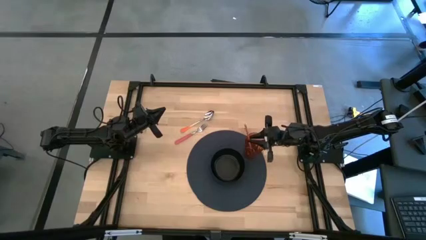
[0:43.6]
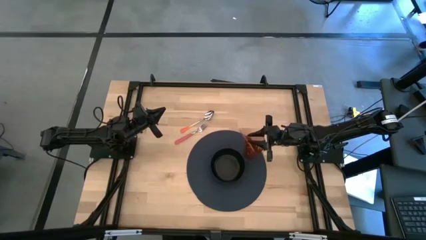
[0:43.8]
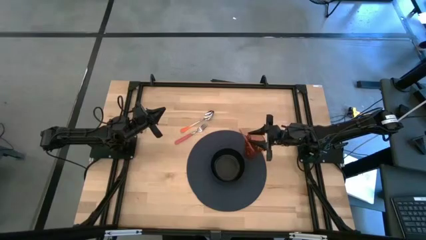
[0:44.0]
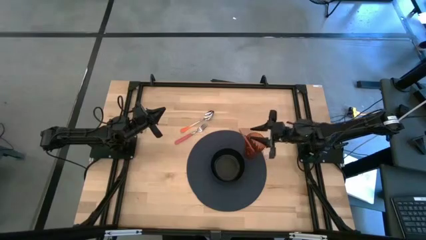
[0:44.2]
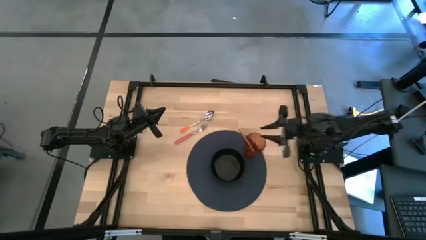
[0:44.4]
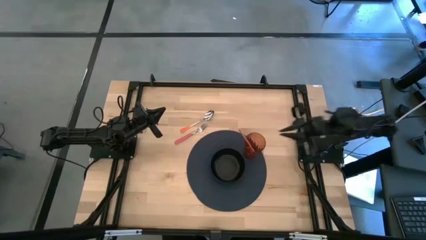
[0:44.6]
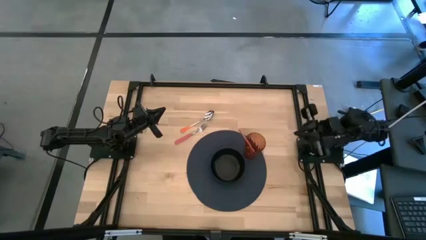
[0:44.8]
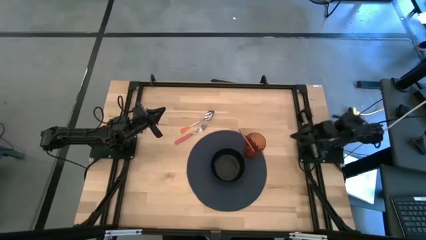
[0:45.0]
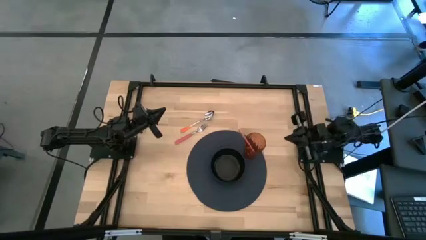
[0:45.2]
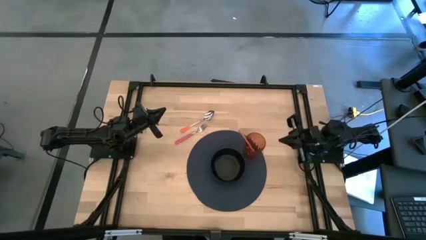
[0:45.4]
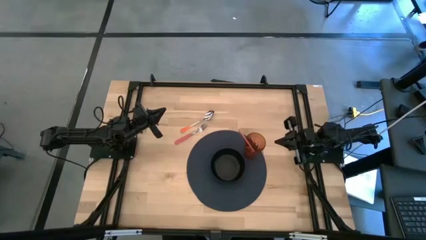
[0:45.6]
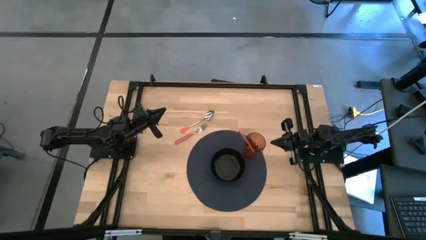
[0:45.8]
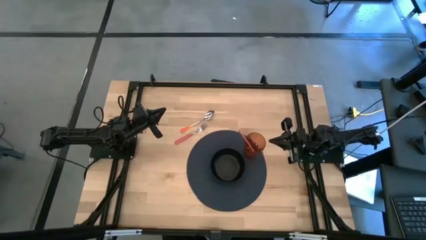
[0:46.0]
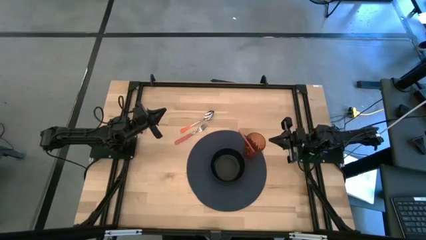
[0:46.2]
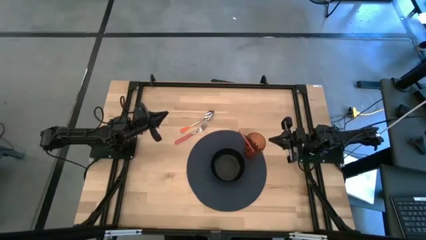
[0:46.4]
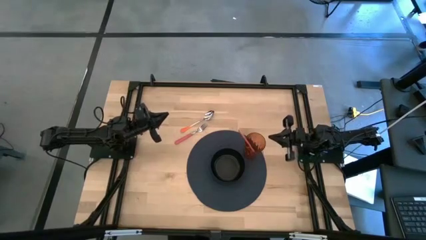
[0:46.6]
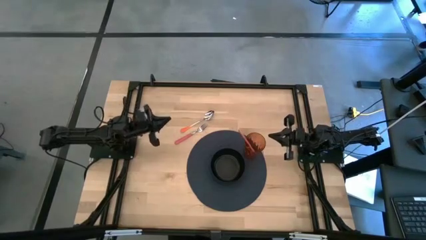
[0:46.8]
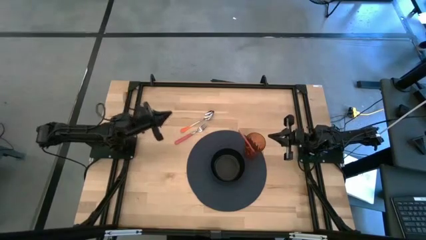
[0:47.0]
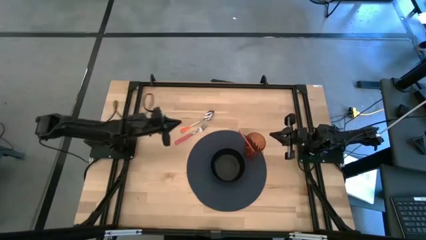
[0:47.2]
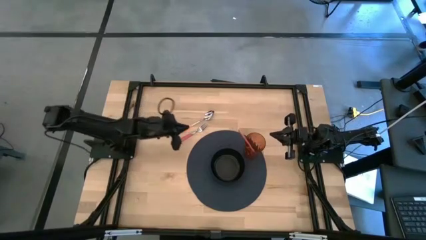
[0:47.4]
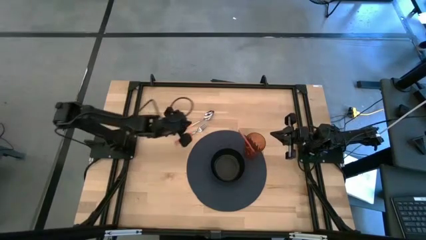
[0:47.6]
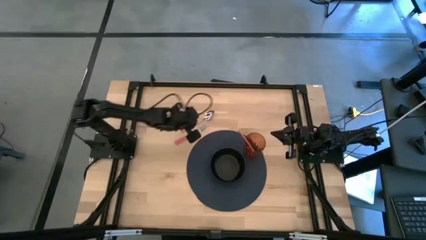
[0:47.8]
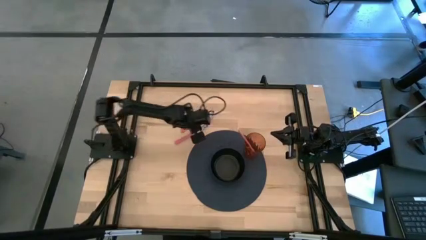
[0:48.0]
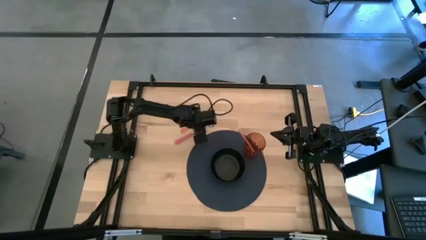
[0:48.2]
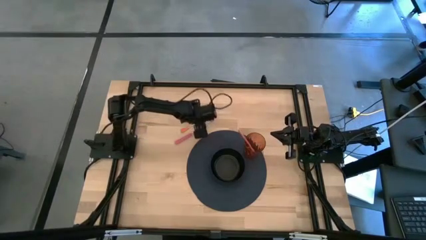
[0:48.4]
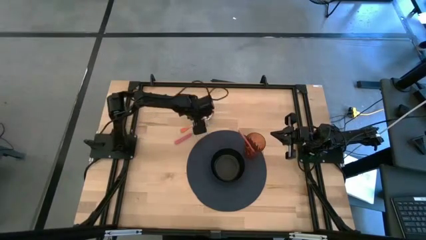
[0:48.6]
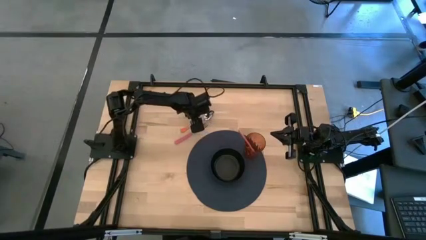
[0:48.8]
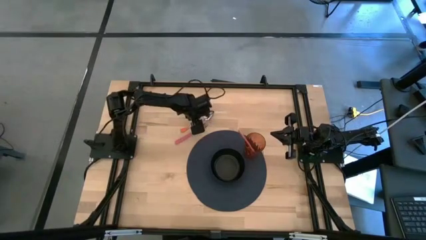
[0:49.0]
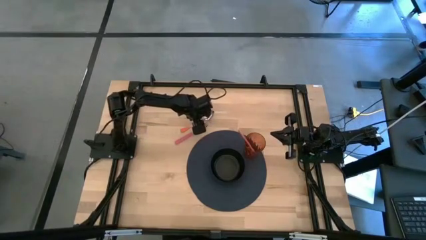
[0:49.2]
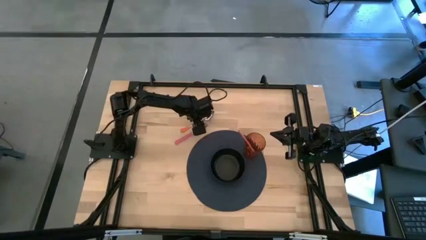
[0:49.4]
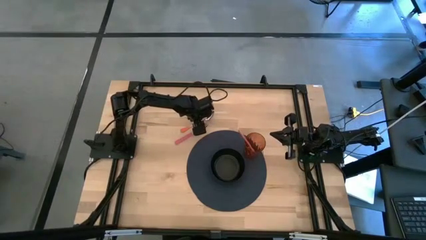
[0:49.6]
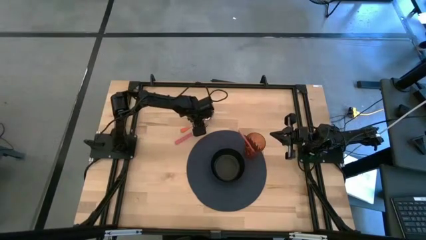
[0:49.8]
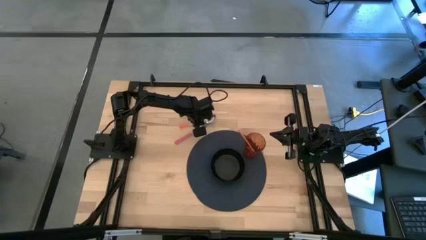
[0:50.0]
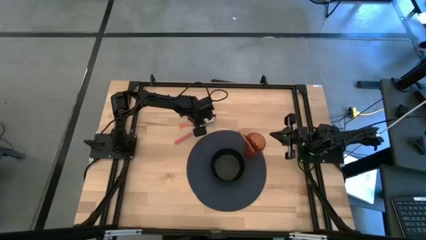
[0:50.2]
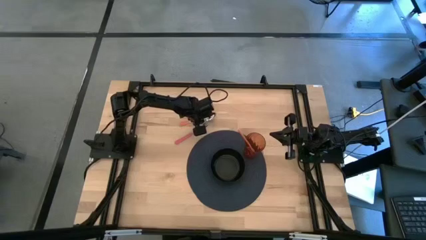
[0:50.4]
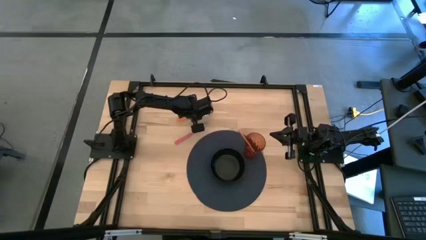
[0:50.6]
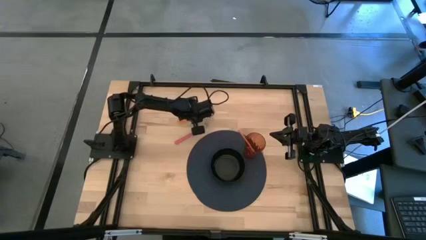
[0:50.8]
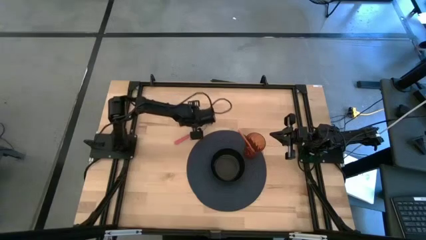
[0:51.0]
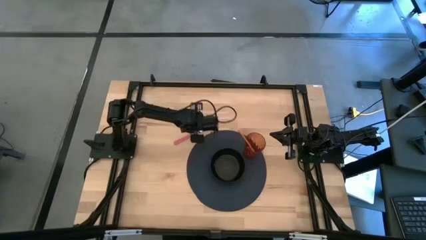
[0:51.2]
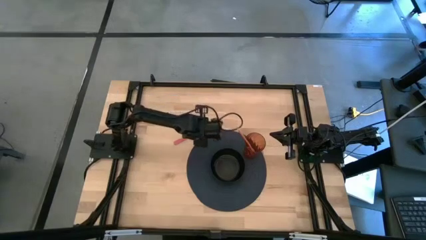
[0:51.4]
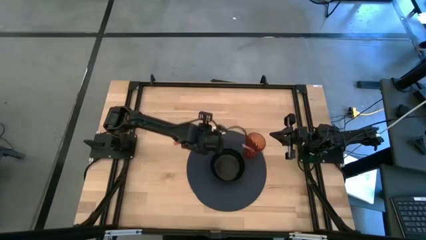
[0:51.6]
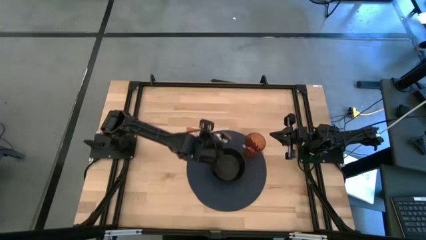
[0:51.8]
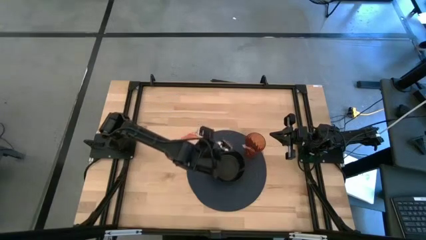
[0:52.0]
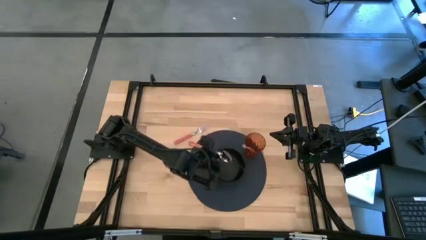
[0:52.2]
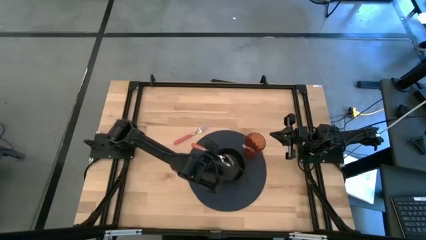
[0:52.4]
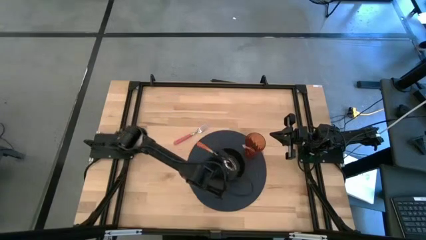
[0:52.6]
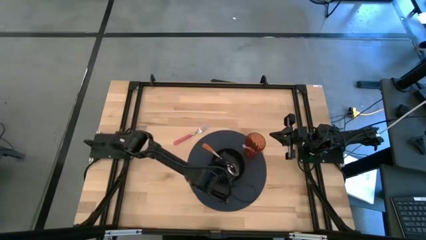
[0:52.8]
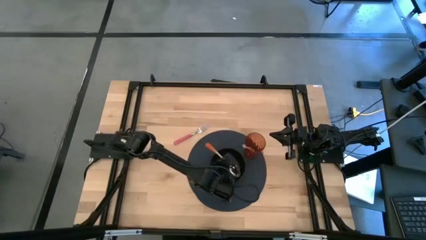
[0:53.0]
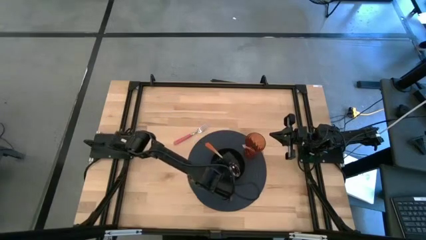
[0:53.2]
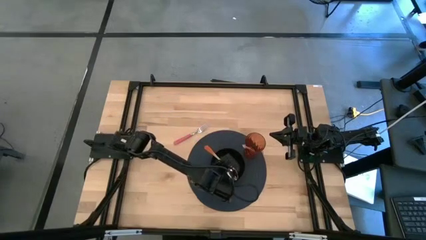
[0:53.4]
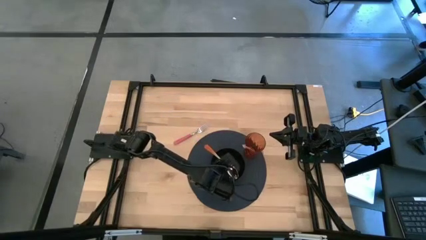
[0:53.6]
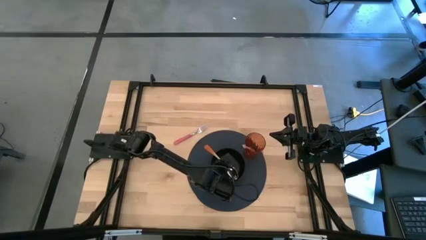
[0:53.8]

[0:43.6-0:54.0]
Task: Pick & Place Utensil
Put the orange spoon into the black bowl
